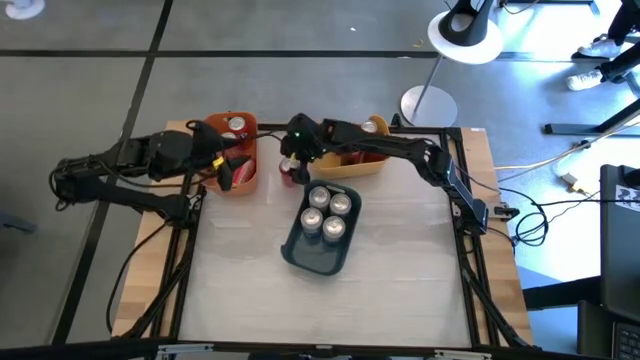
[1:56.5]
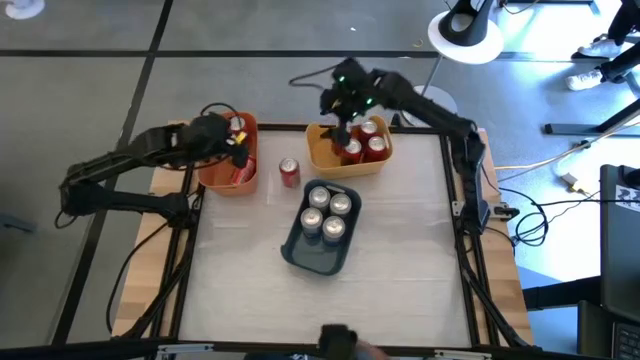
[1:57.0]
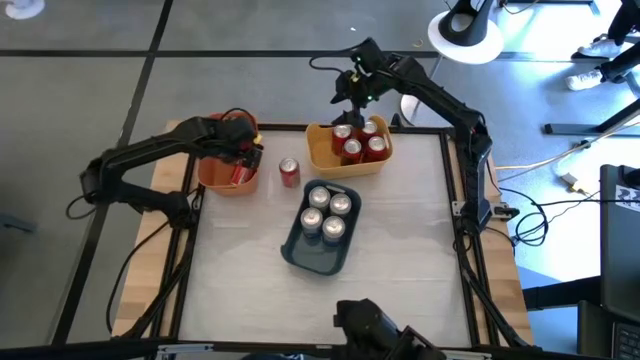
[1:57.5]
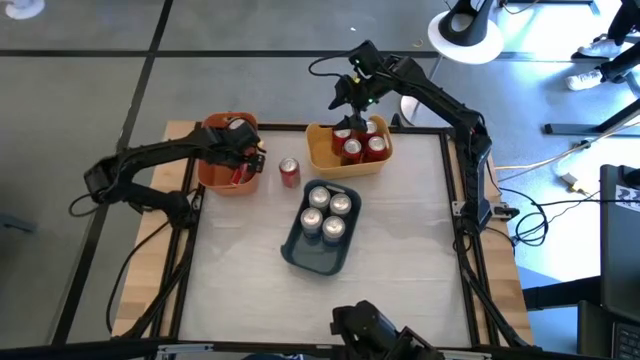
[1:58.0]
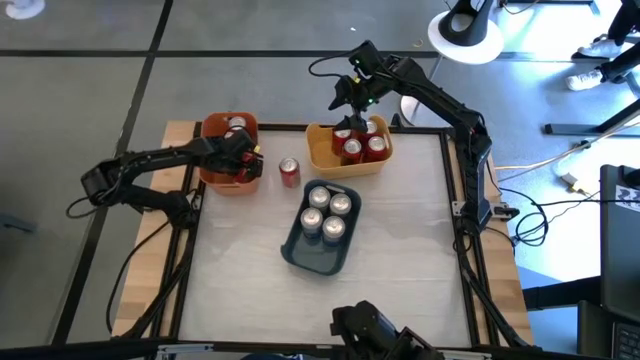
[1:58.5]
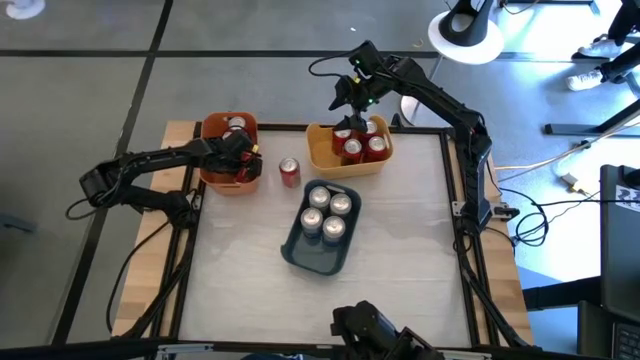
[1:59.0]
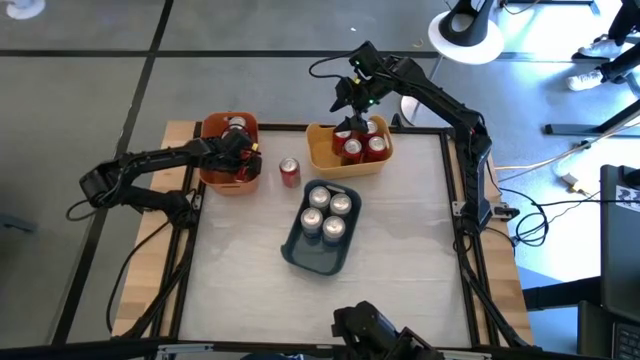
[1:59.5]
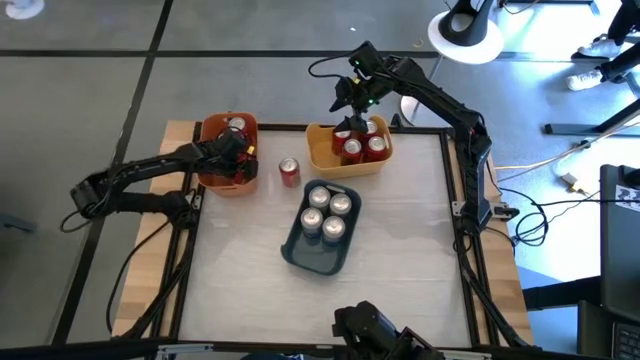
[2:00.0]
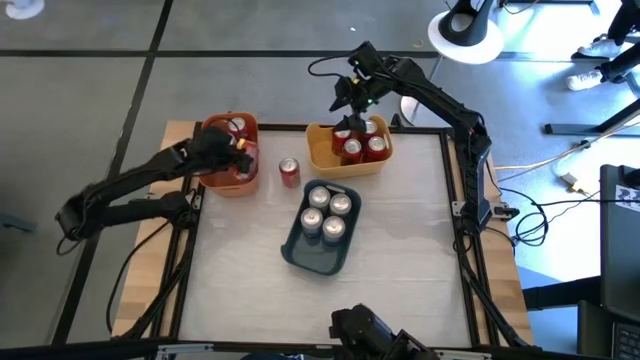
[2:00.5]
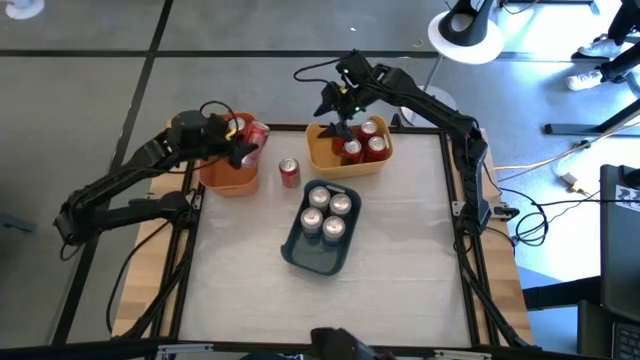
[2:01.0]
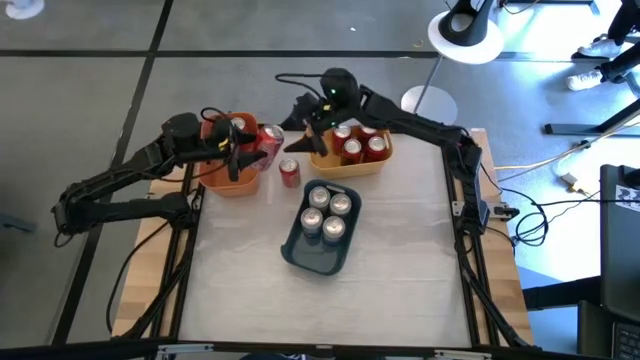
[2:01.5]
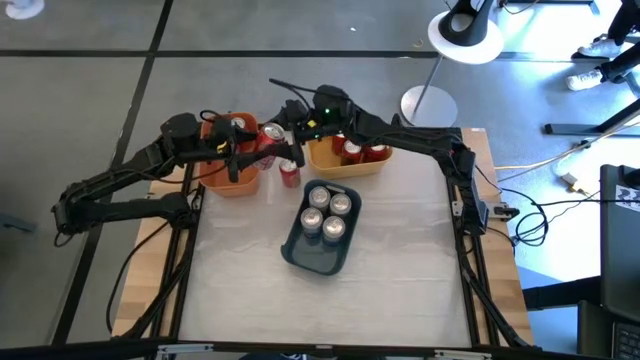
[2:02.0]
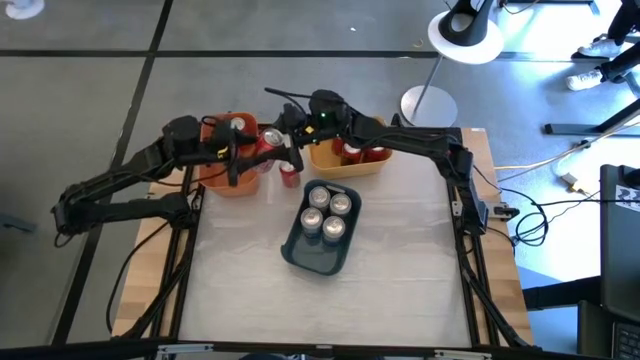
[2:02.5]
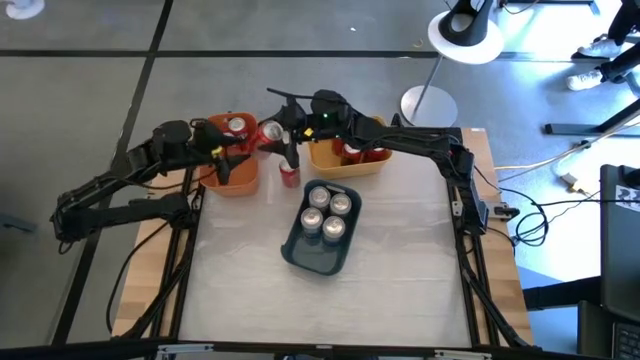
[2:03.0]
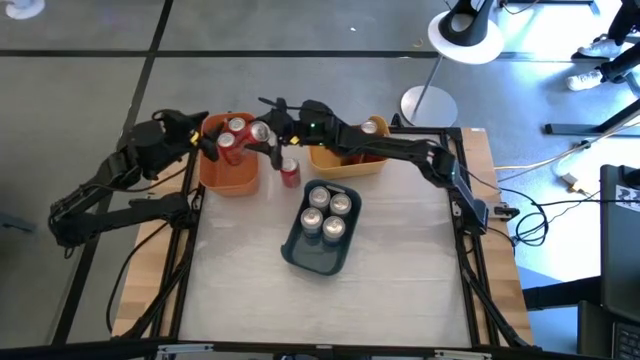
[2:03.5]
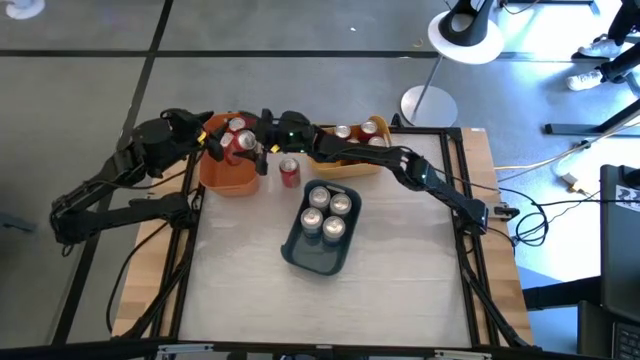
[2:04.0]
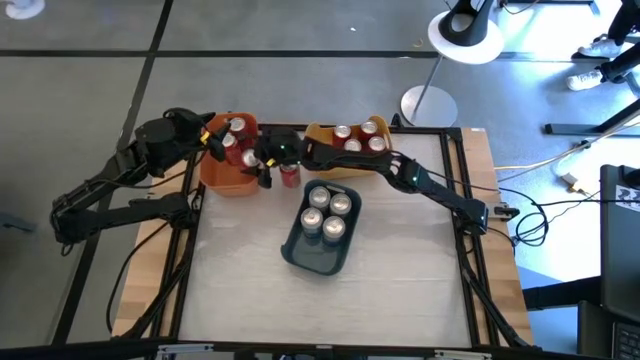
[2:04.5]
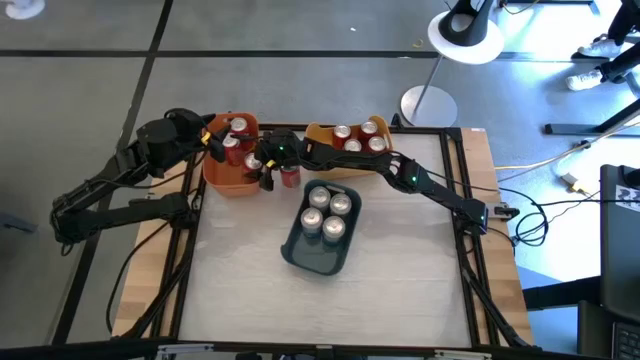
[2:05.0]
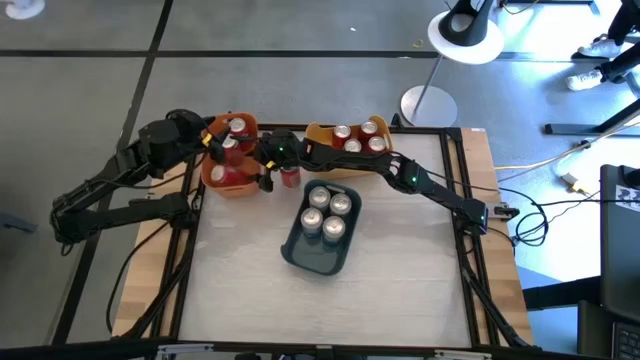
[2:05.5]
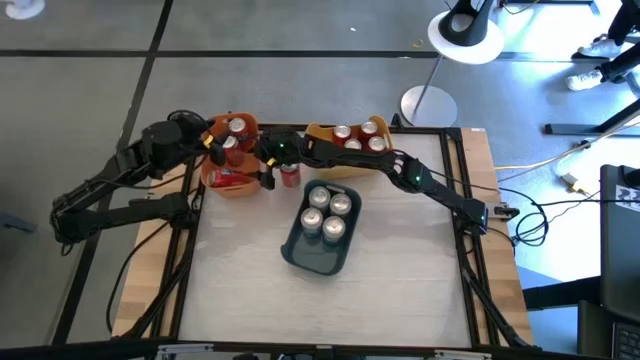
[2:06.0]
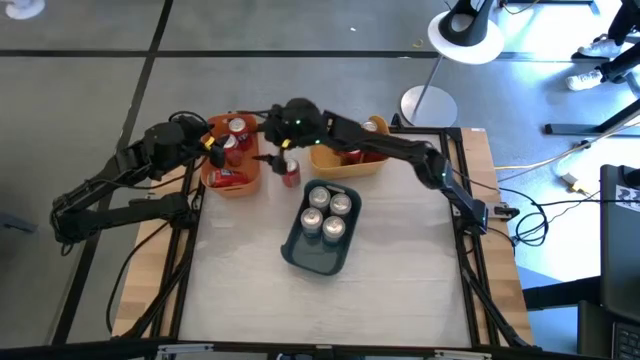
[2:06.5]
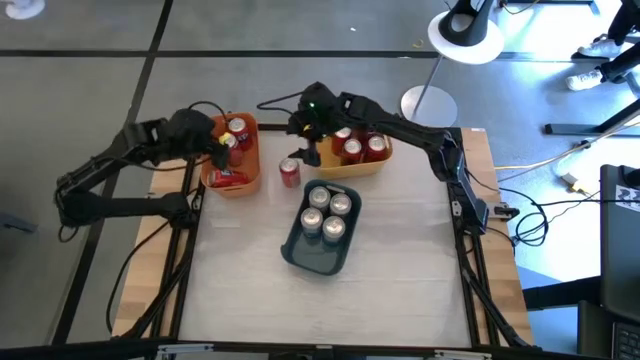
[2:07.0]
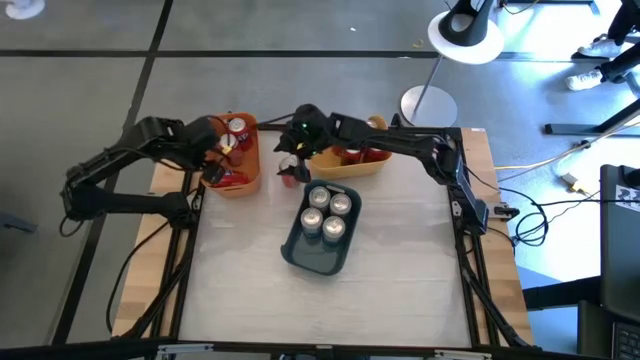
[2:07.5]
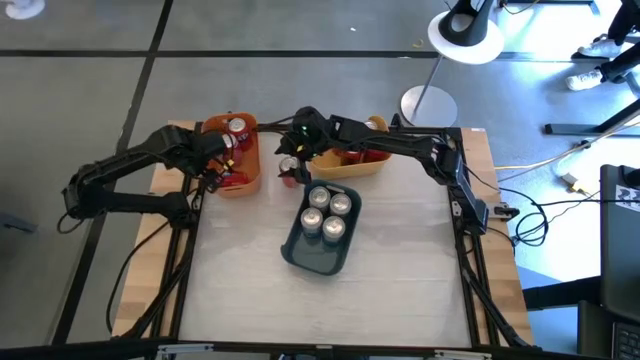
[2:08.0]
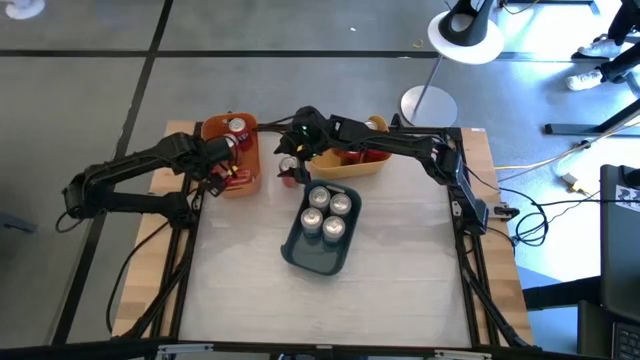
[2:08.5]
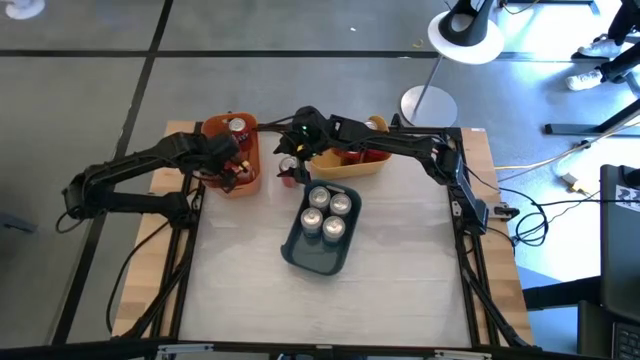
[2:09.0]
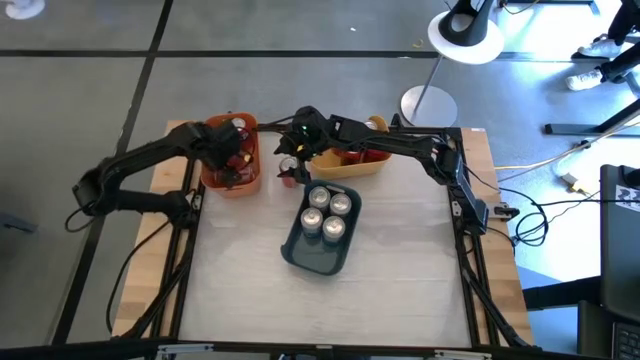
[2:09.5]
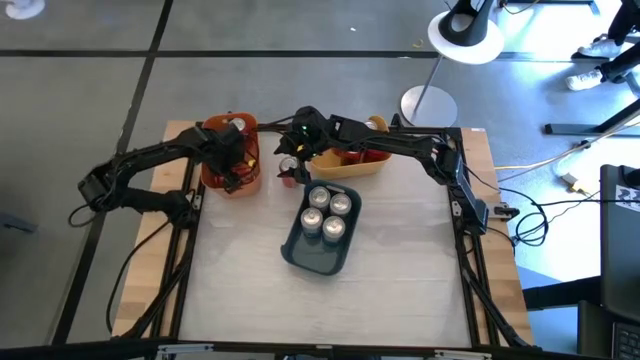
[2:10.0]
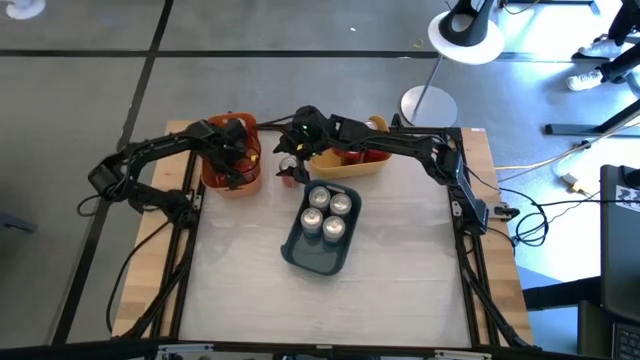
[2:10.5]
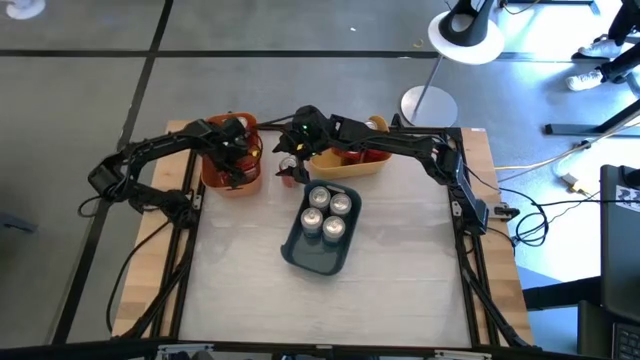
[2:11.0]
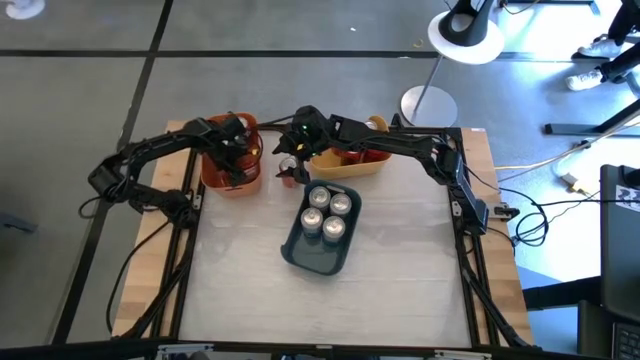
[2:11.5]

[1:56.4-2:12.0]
Task: Sort soda cans
Adjust the orange soda can inside the orange bin

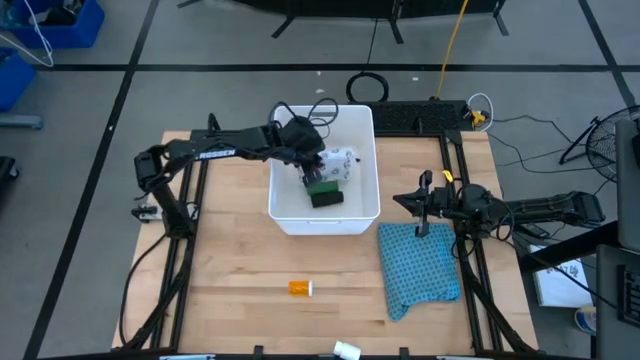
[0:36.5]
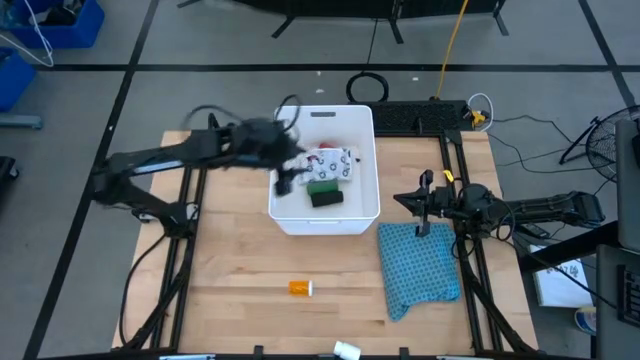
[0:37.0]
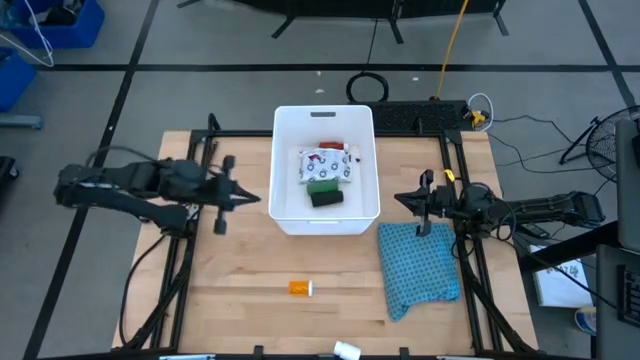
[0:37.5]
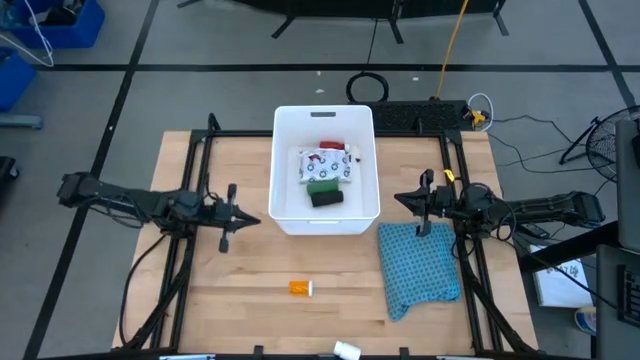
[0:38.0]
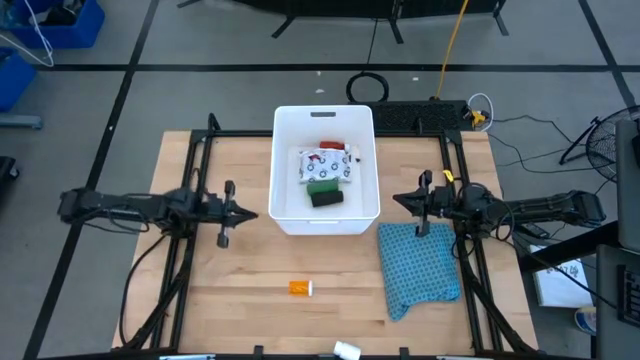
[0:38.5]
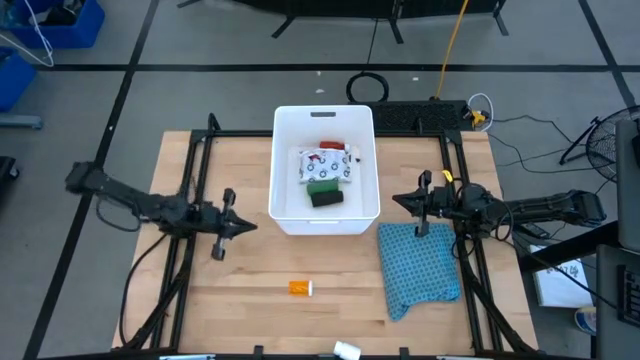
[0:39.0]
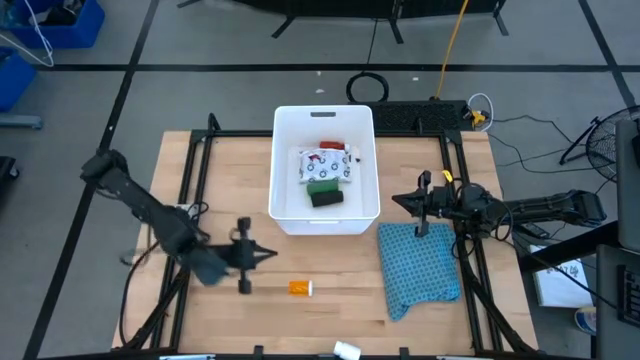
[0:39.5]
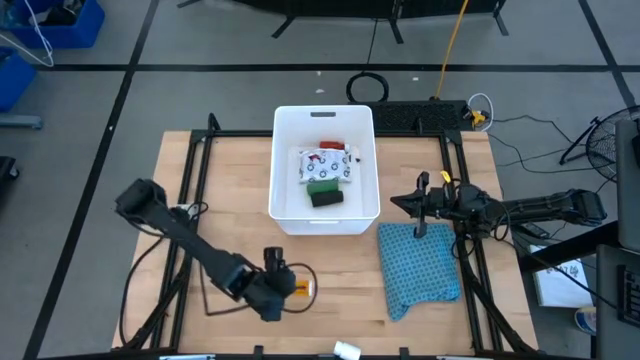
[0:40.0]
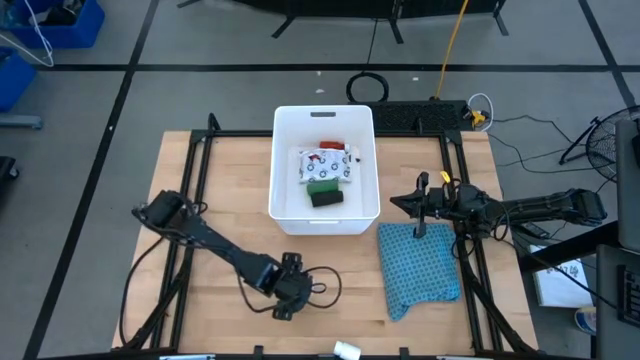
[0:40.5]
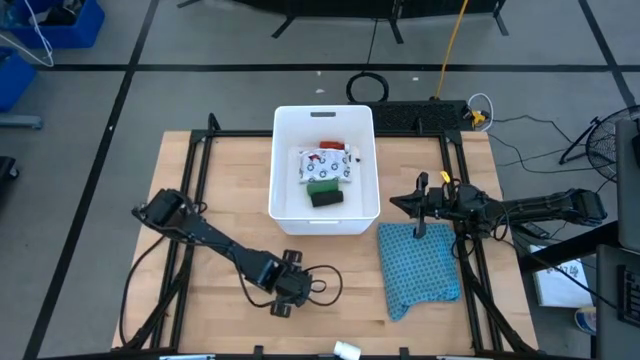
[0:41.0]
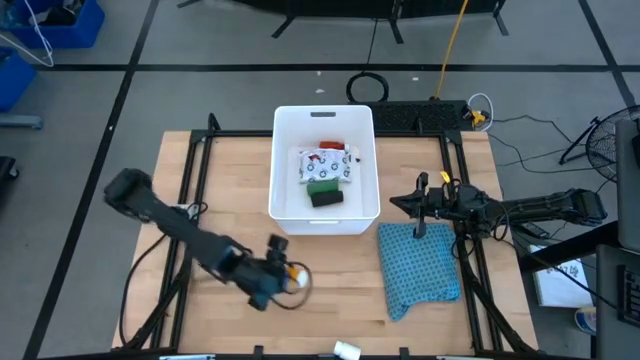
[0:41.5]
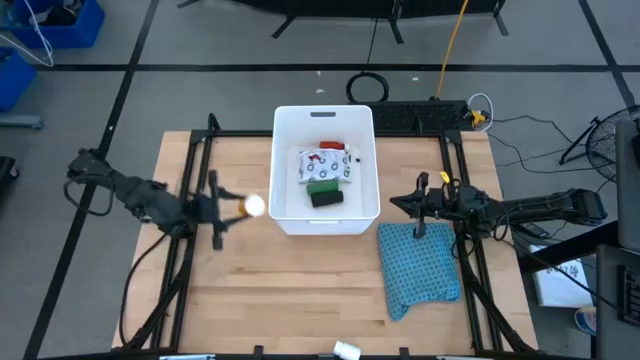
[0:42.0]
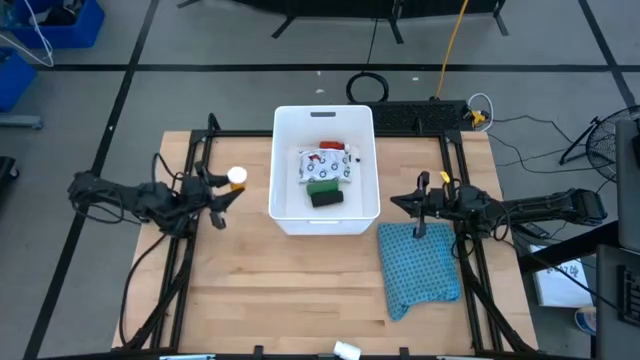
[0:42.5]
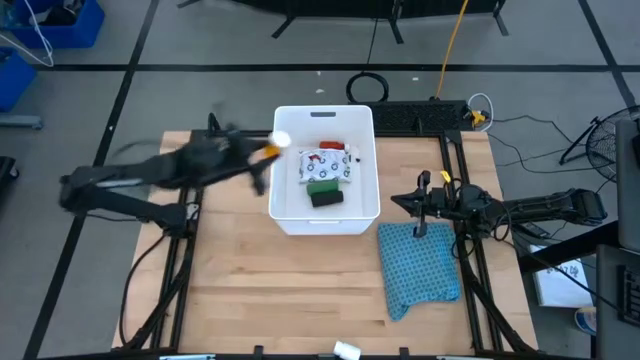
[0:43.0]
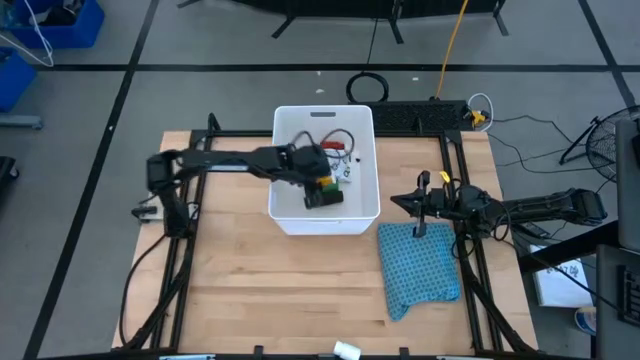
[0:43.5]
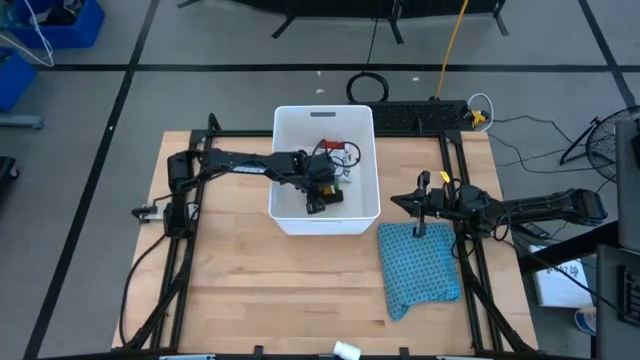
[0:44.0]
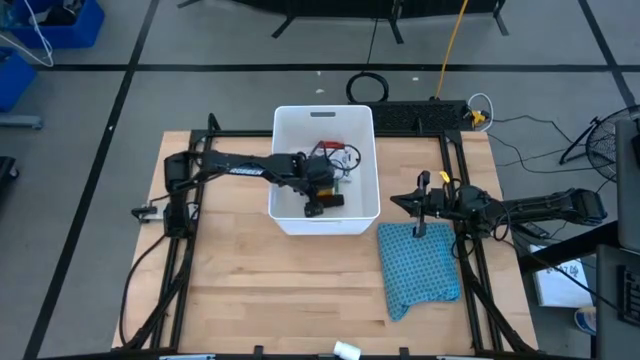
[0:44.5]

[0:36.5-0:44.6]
Task: Pick & place medical supplies in basket/bin
Put the orange pill bottle into the bin
